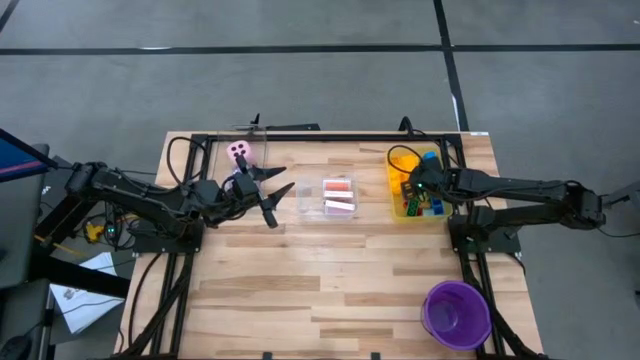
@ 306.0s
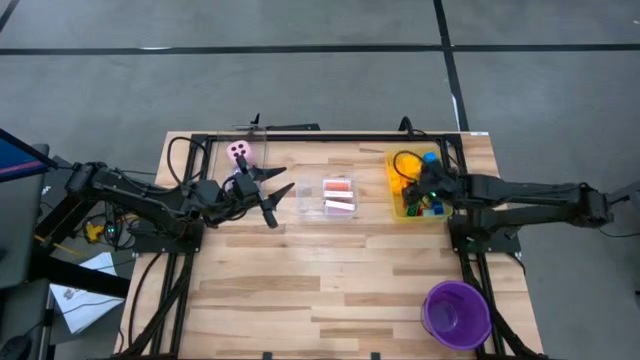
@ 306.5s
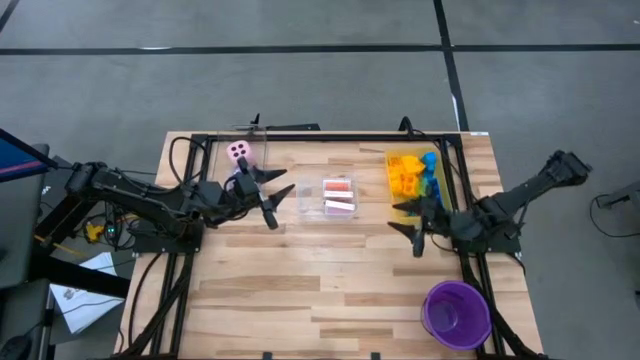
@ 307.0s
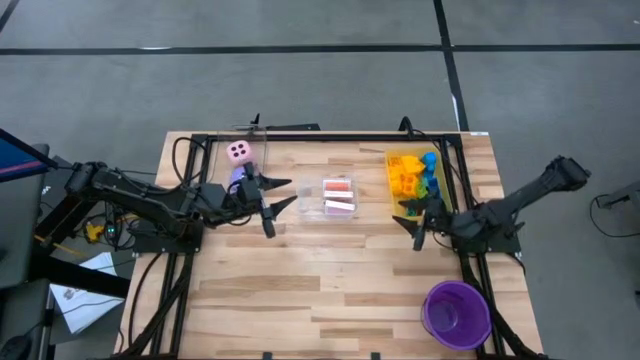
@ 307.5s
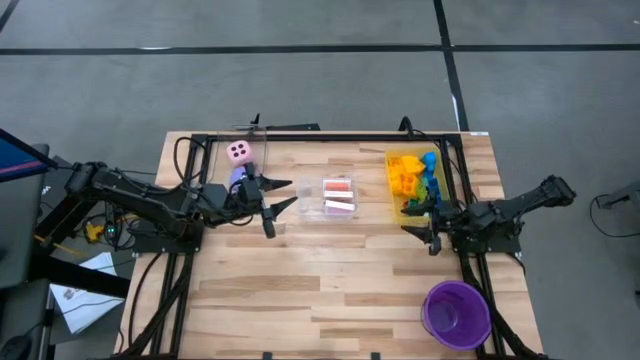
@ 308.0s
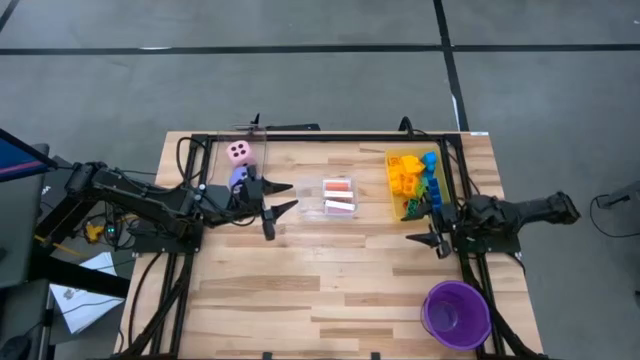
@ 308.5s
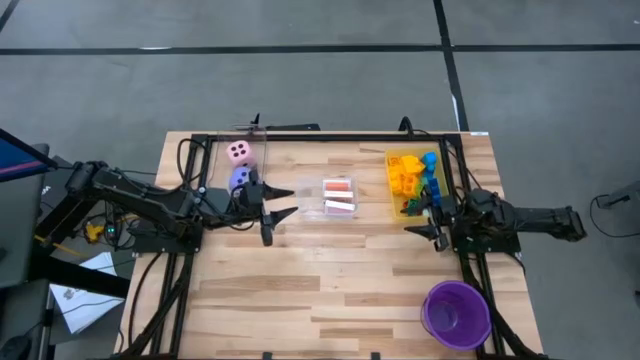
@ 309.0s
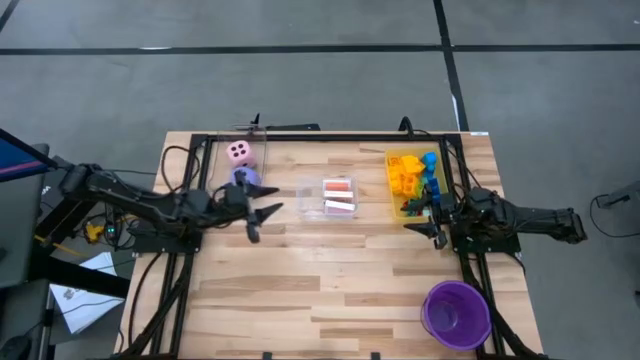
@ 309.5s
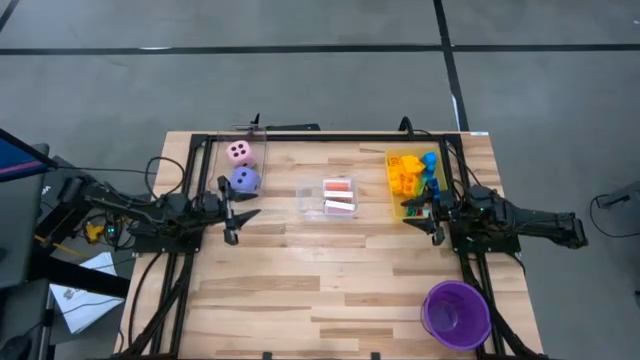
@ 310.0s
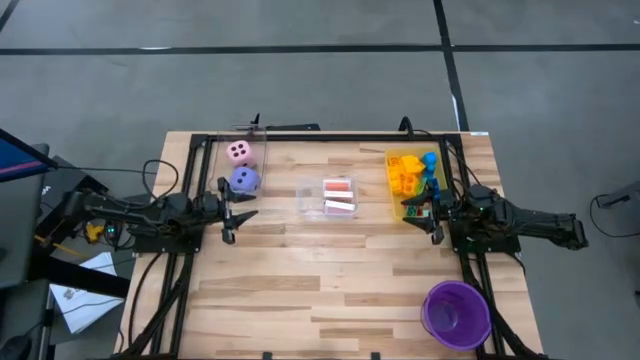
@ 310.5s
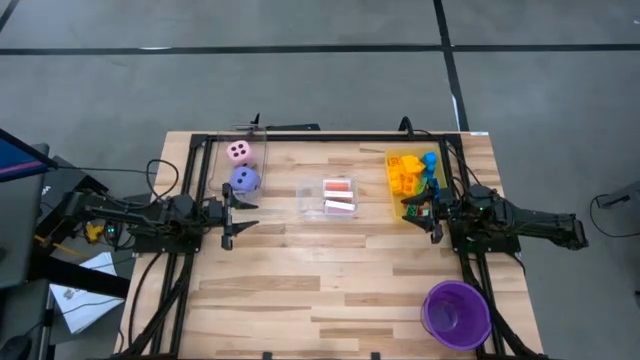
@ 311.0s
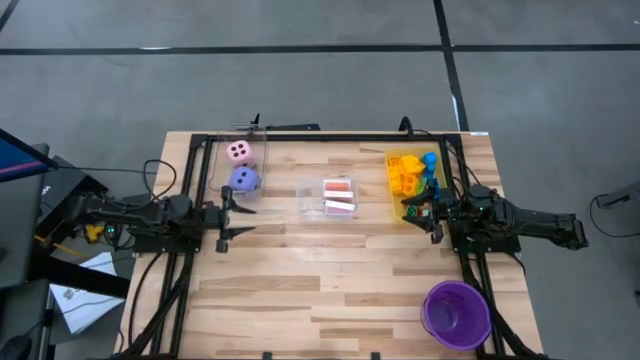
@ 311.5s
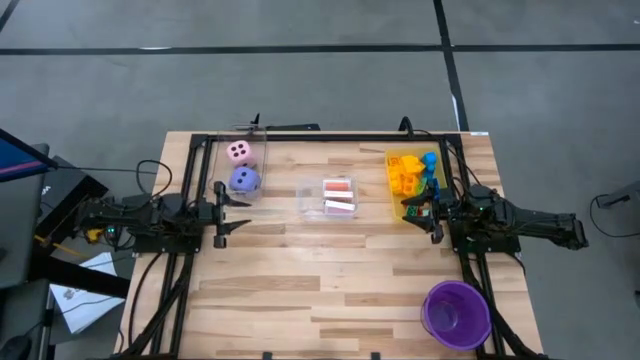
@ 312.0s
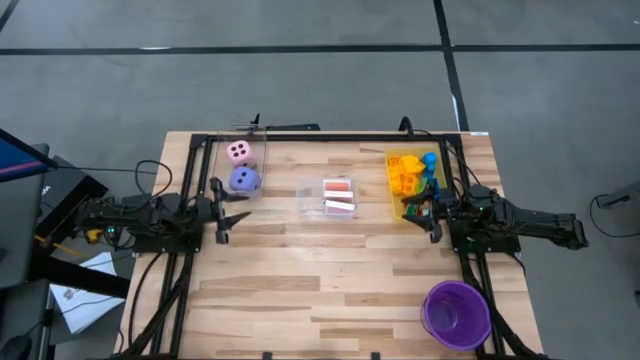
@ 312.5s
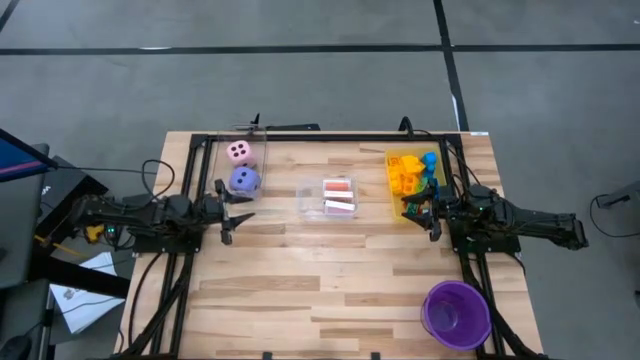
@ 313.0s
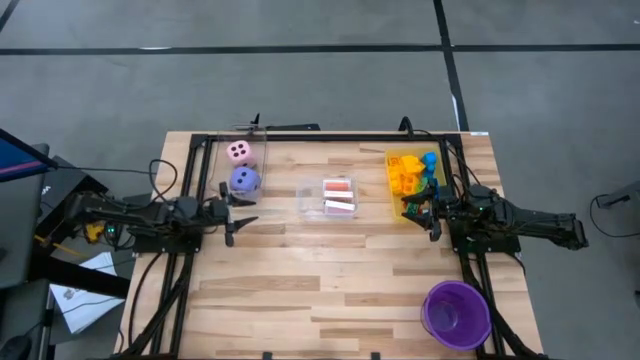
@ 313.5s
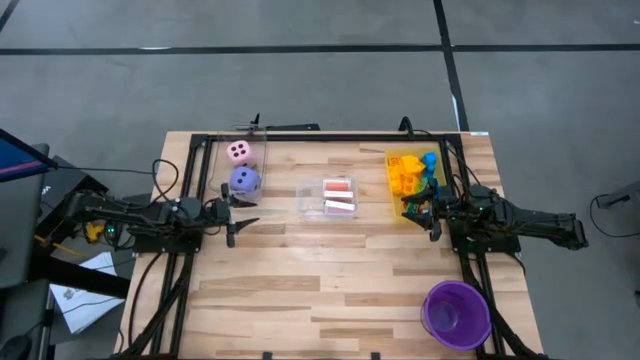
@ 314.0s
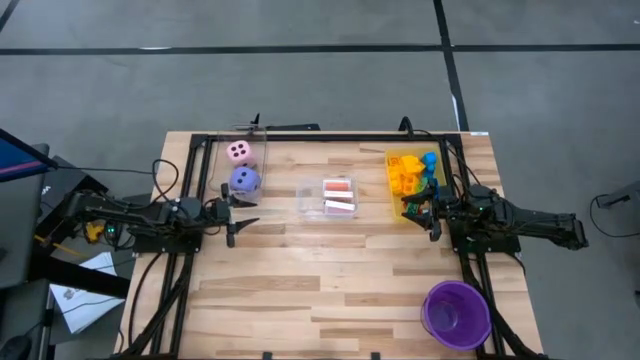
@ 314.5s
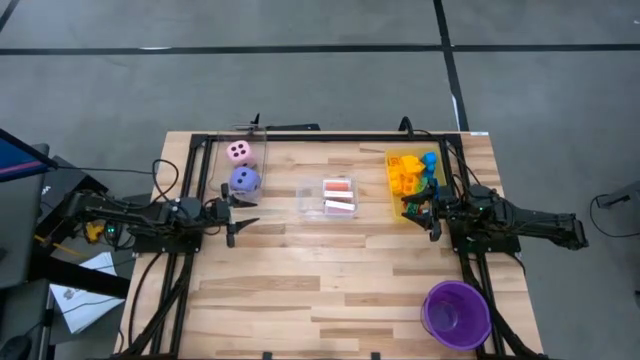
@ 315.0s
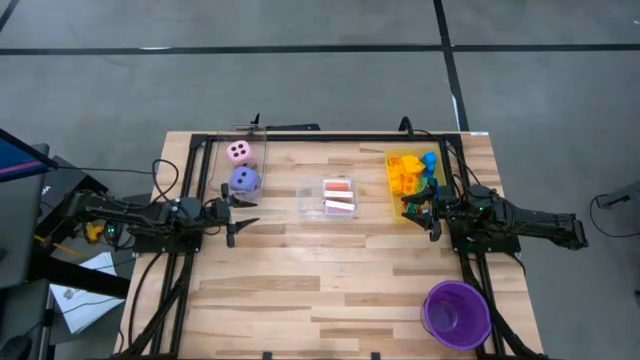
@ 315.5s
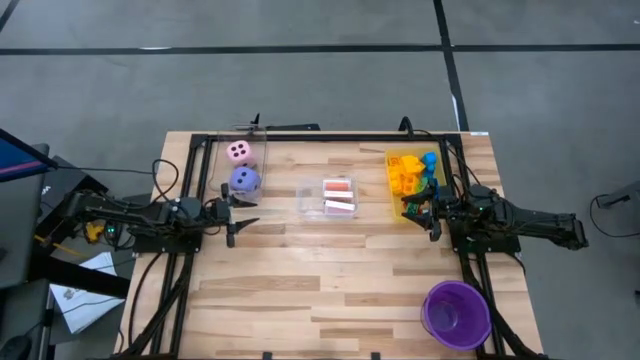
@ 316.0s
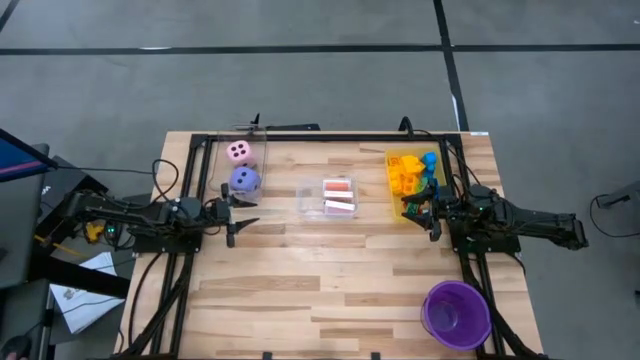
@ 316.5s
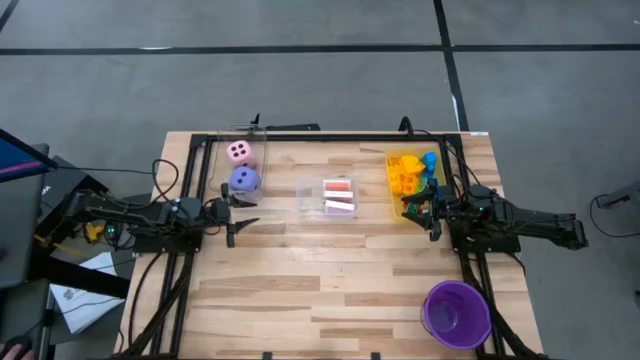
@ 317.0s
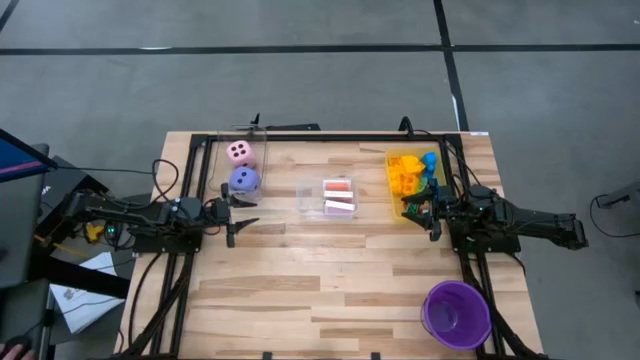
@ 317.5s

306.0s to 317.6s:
Task: Pick & Place Toys
Return to Home Position

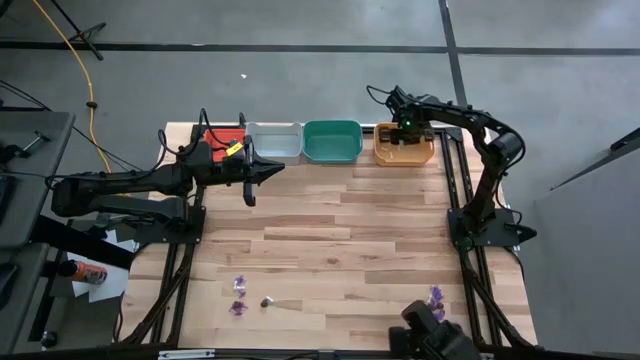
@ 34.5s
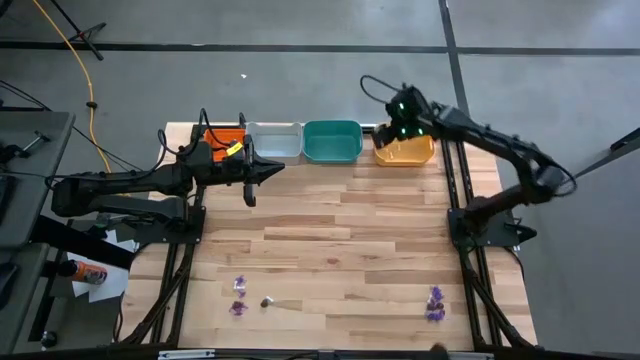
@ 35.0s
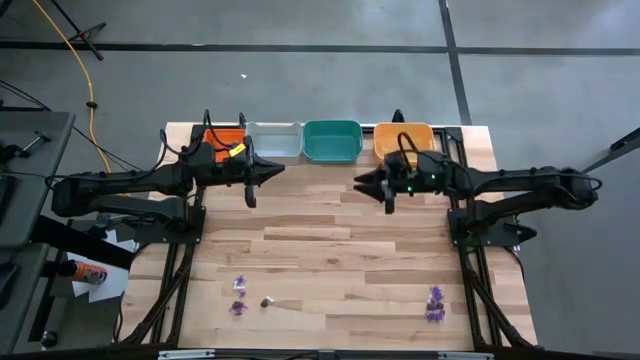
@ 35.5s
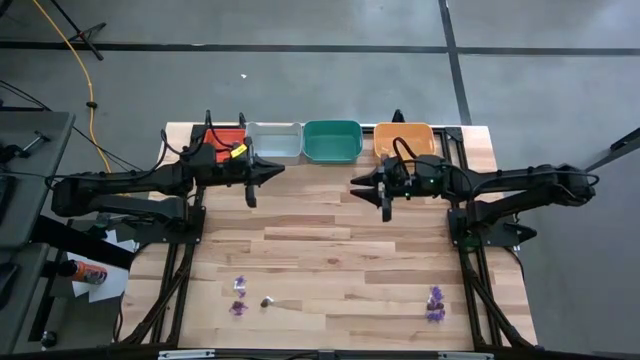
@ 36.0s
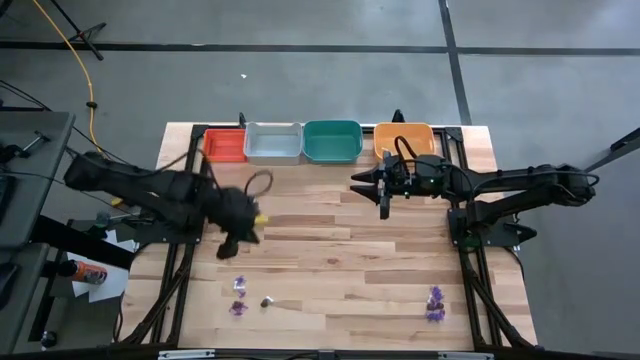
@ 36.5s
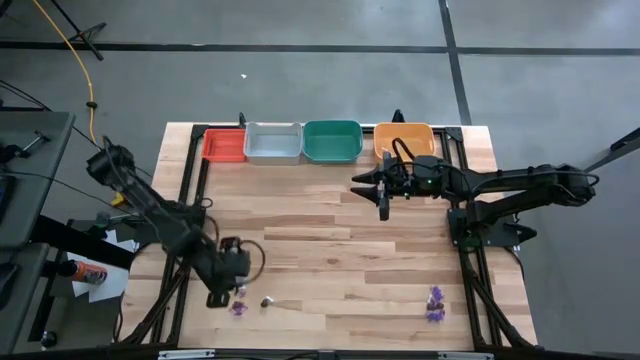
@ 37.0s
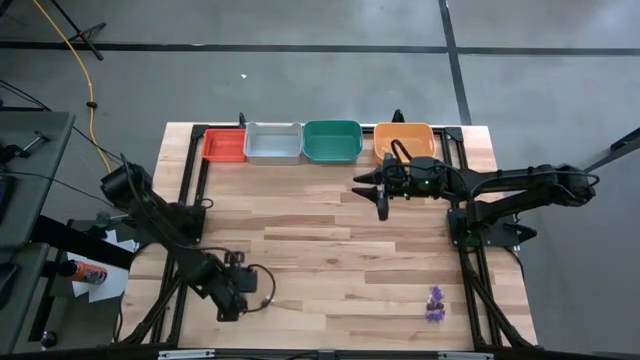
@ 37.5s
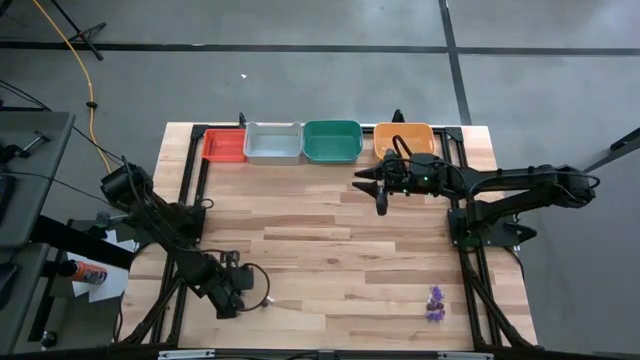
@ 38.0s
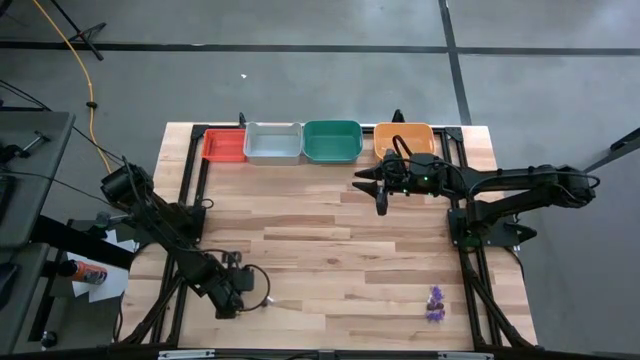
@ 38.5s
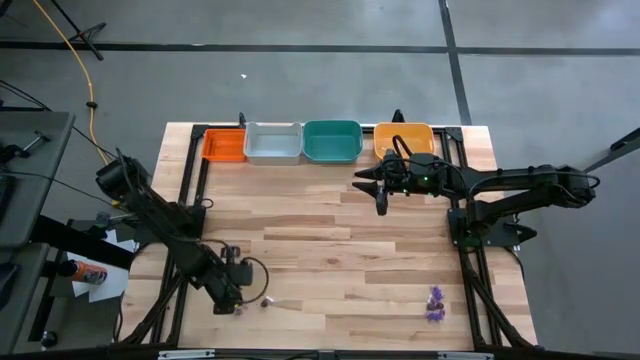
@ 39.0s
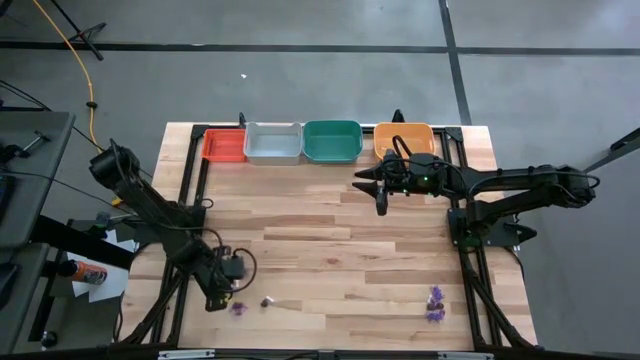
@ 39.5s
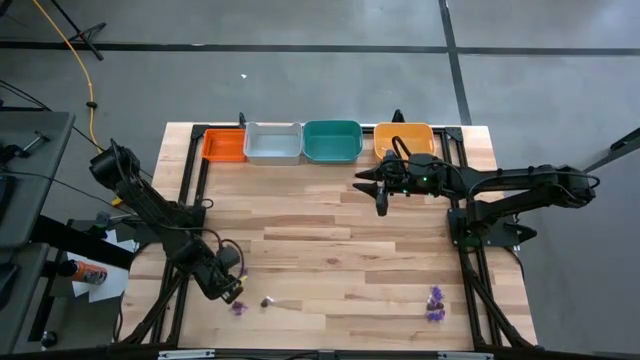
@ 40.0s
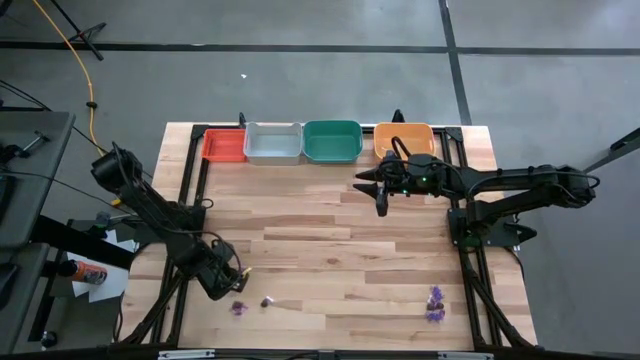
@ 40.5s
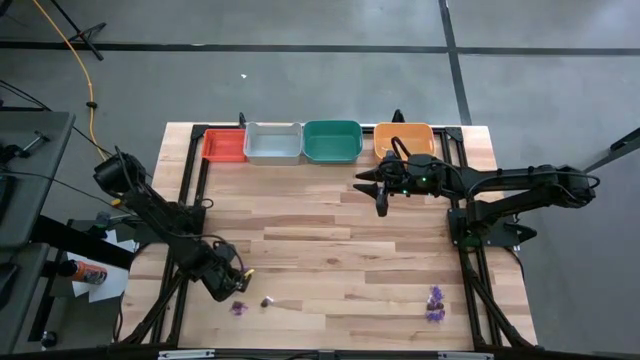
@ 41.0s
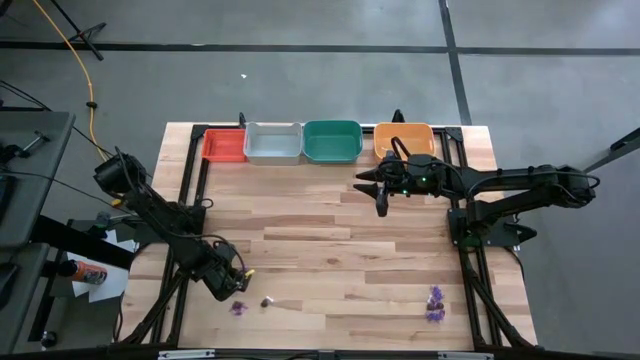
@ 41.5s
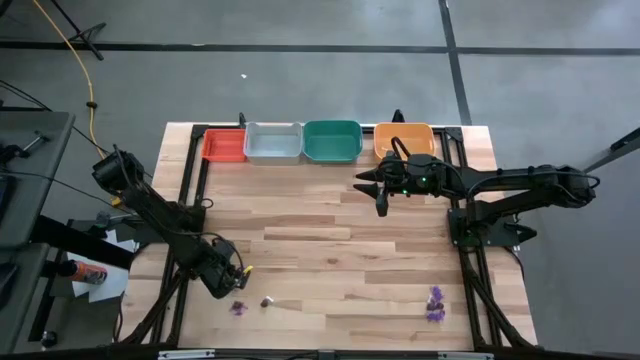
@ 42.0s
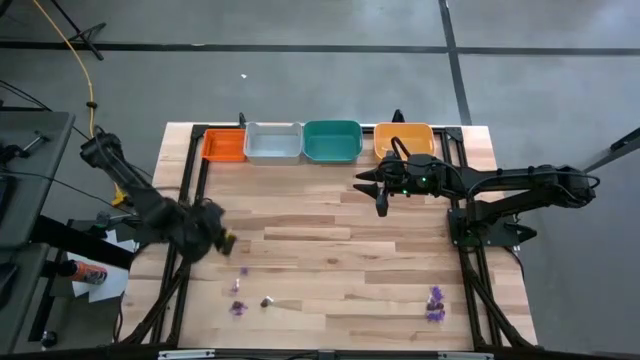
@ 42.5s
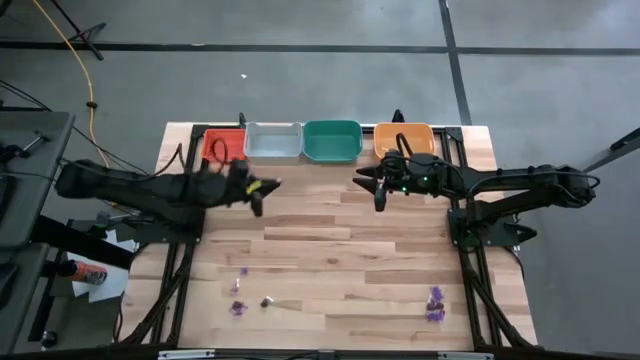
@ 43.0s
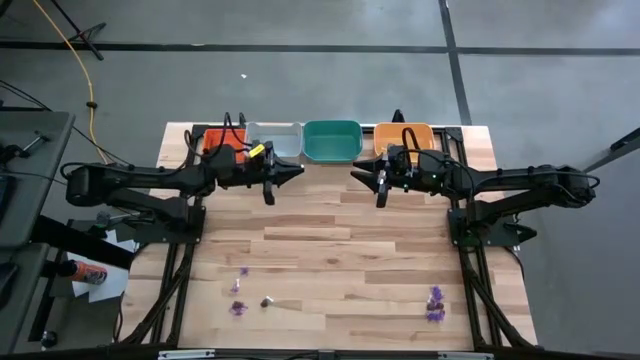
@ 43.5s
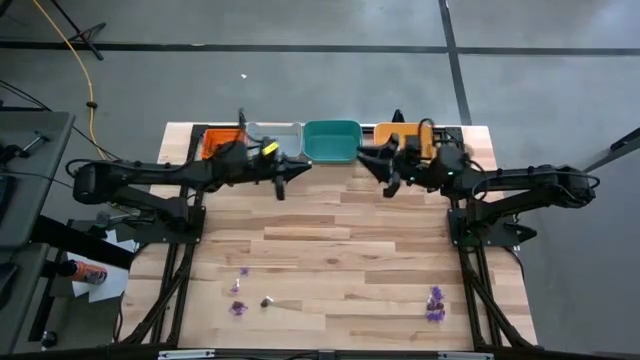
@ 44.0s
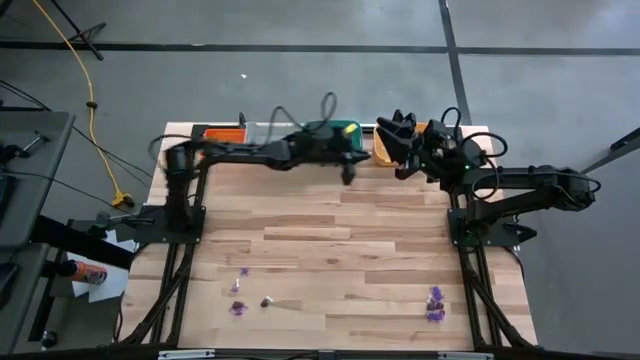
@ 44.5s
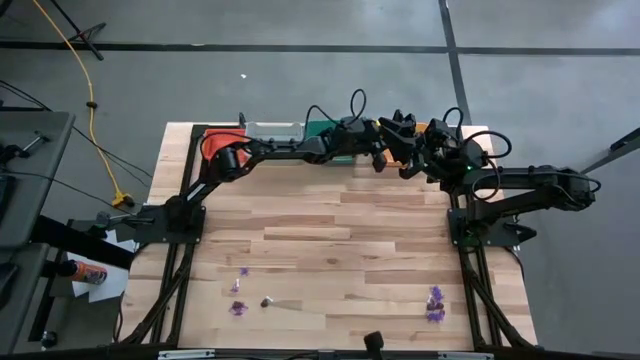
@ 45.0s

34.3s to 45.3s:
Task: Sort Halloween decoration
Put the white bone into the yellow bin
